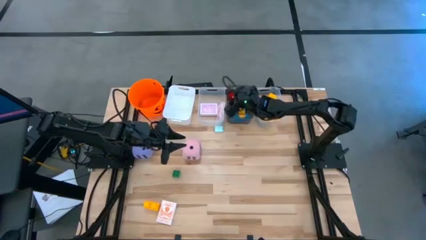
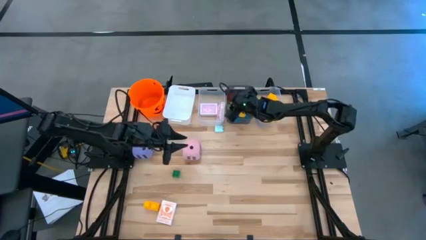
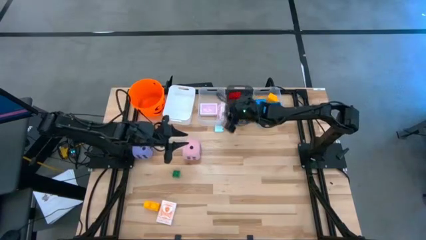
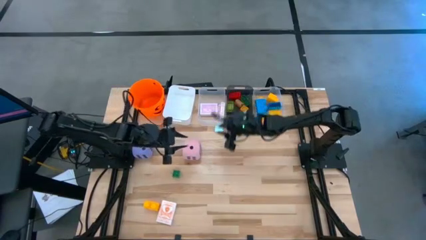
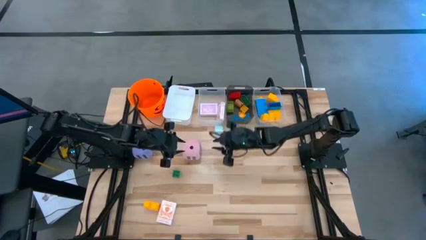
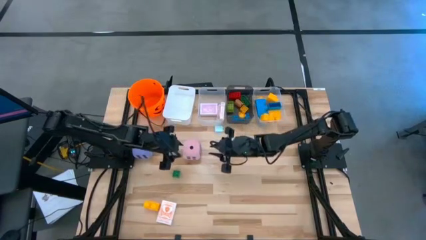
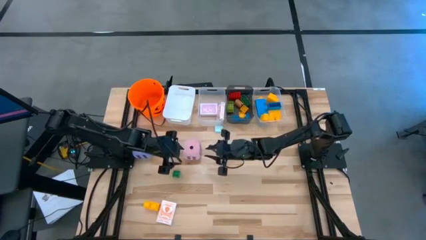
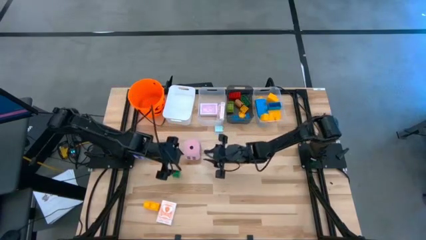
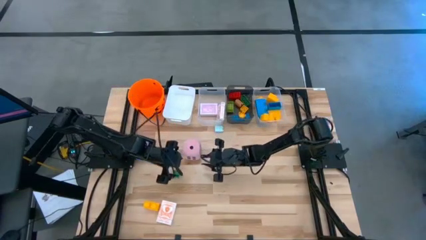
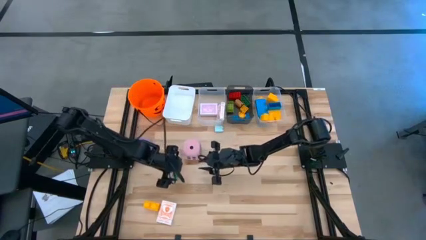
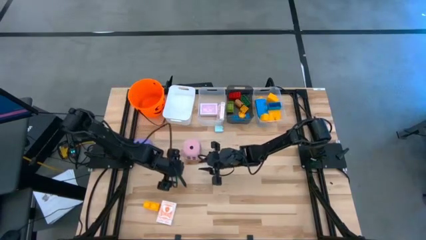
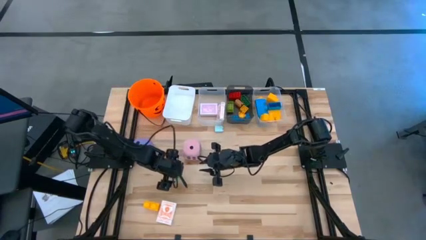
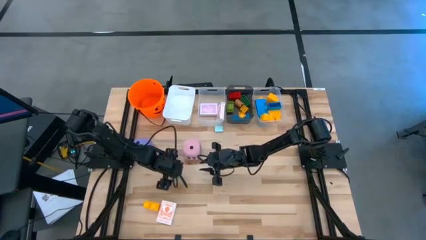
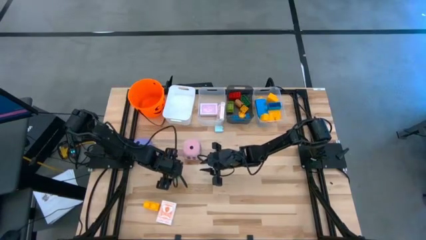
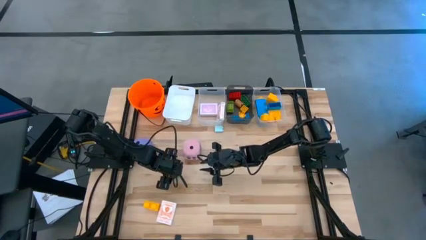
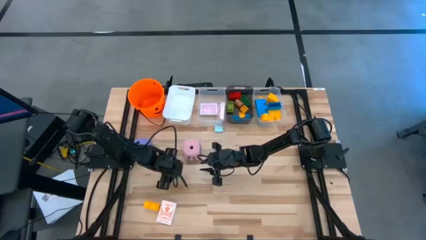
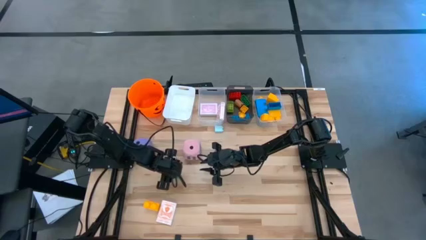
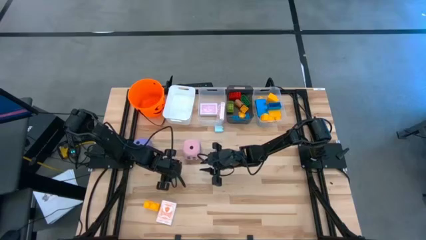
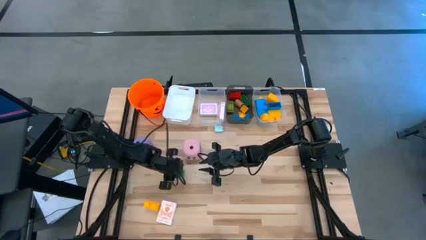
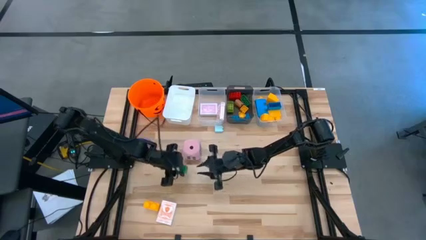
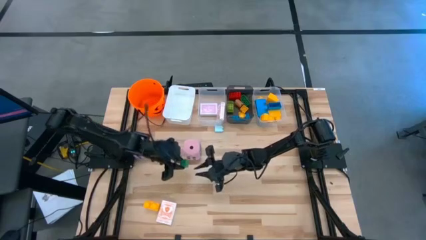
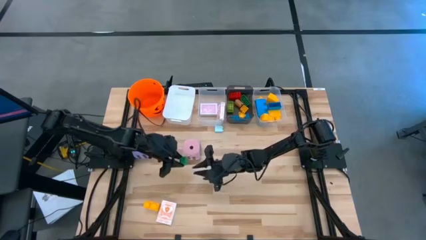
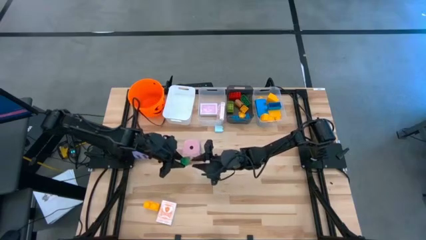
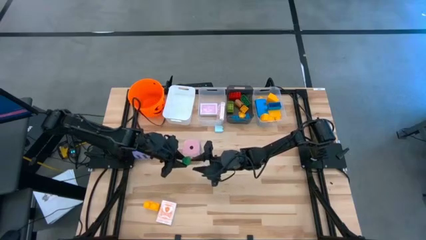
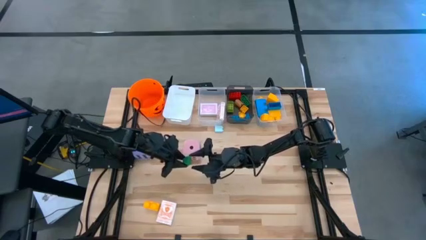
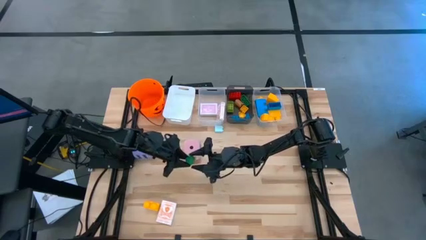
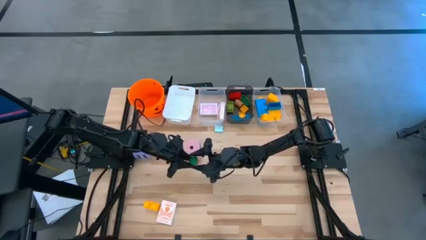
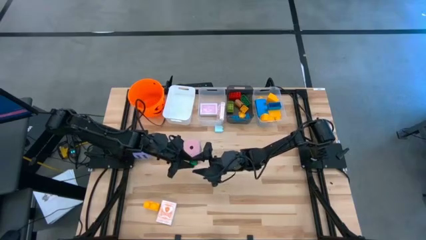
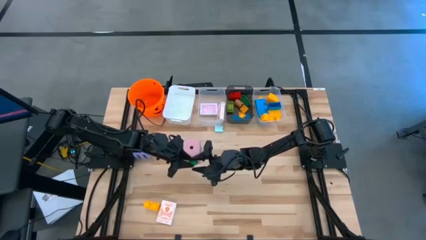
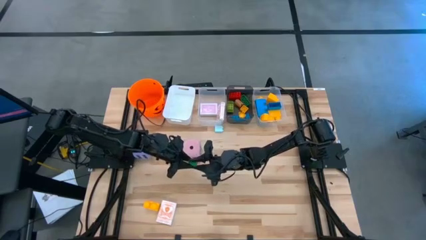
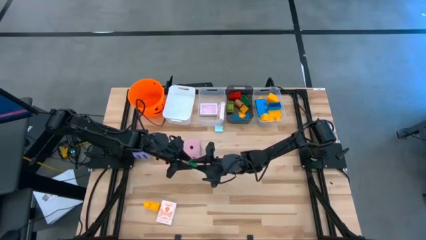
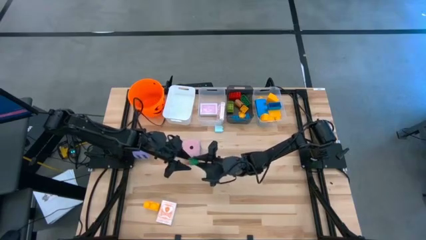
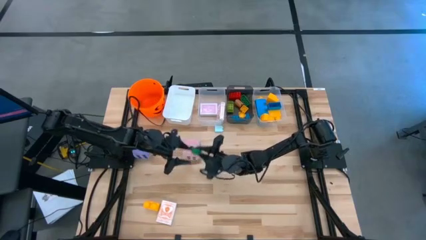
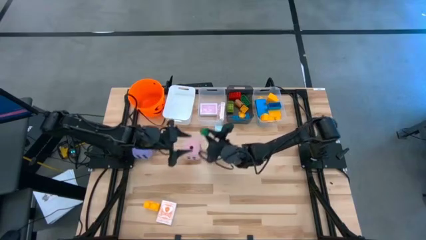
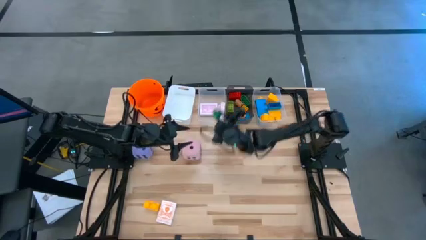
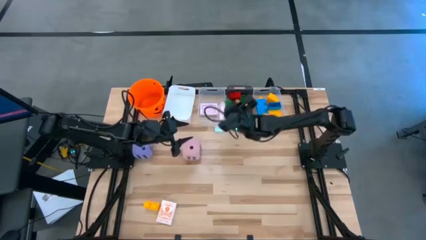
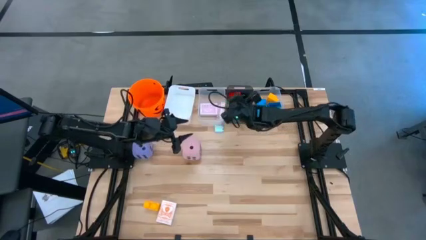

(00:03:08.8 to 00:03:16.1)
Task: Pick & Place Toys
Put the small green game piece into the black bin

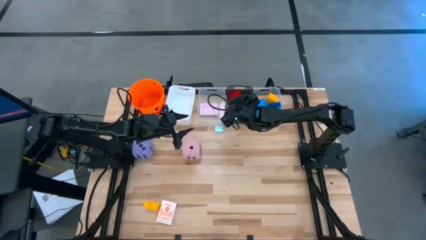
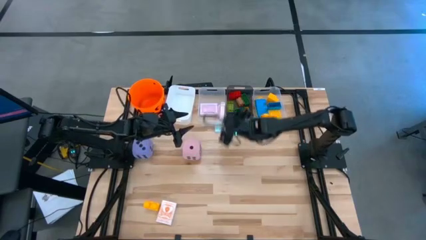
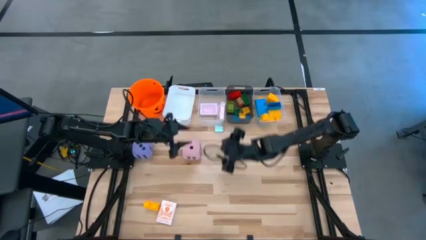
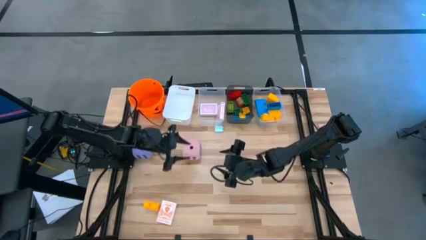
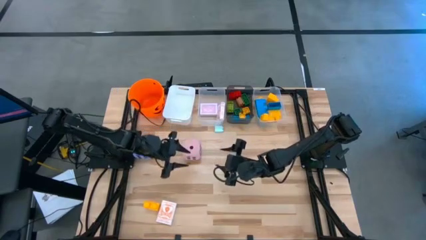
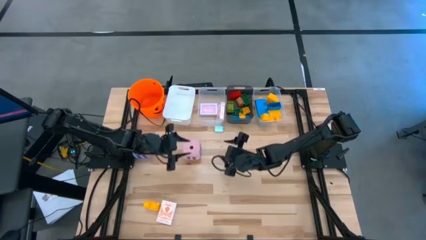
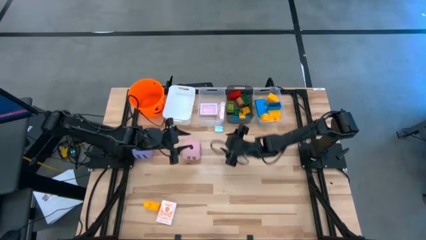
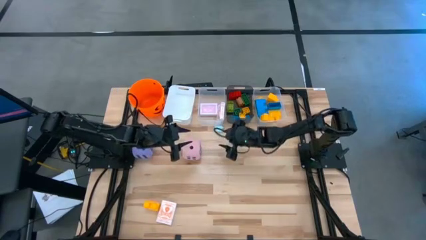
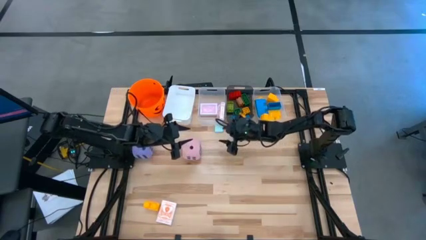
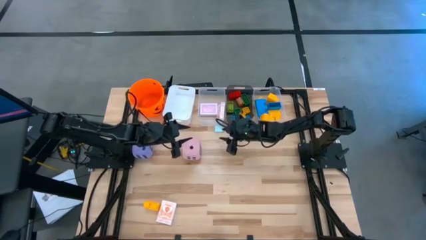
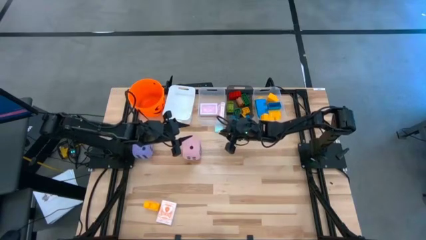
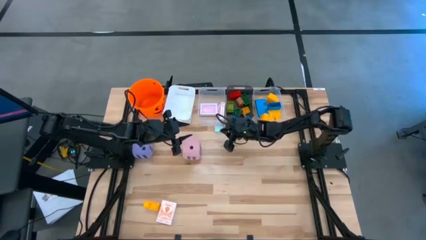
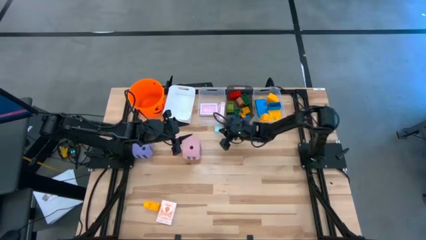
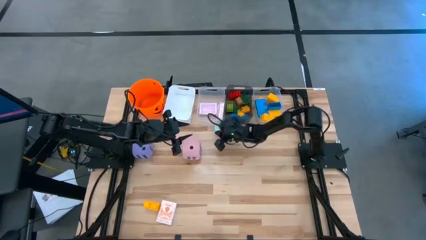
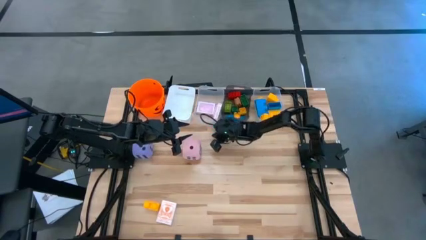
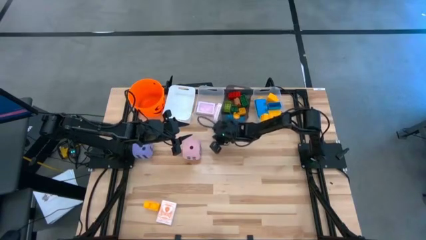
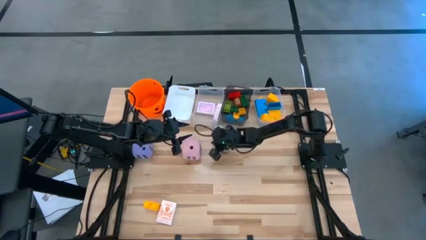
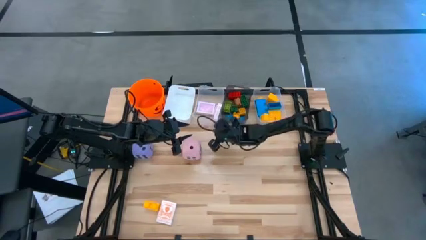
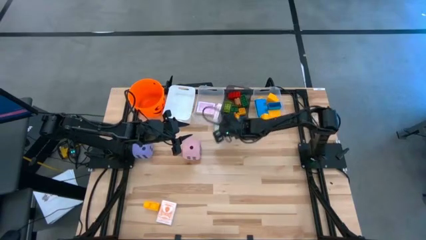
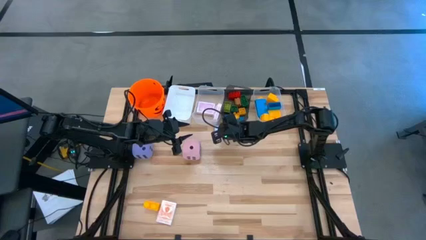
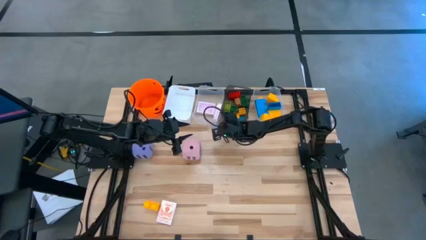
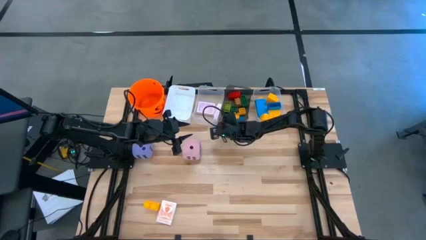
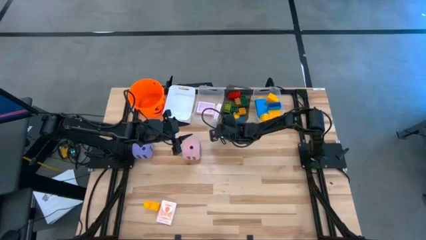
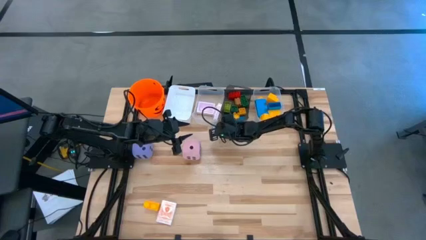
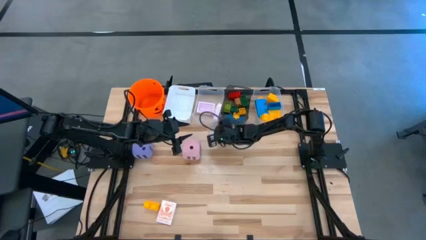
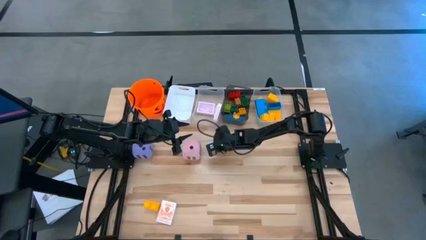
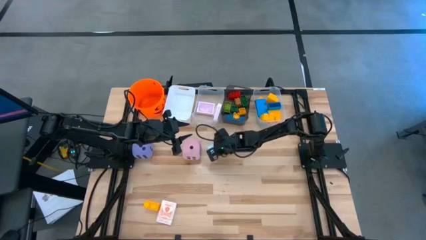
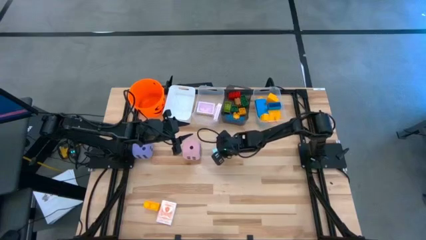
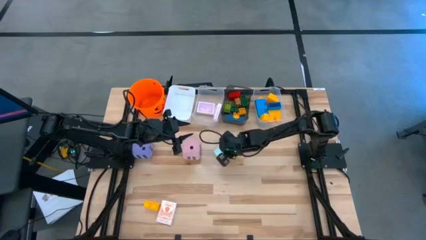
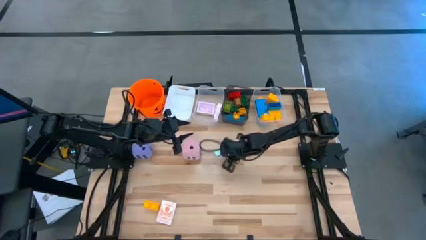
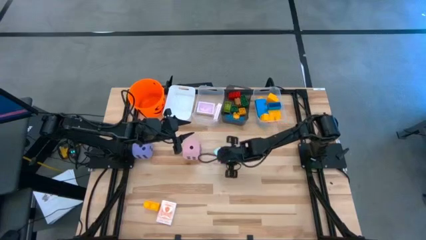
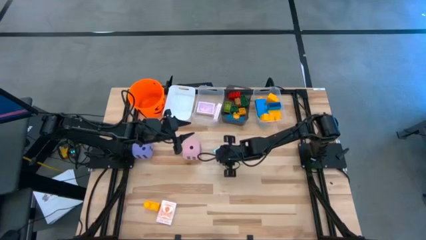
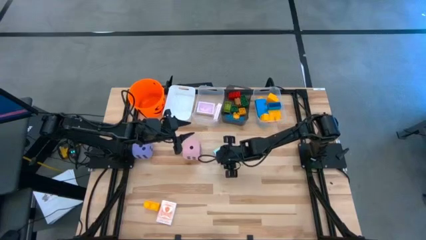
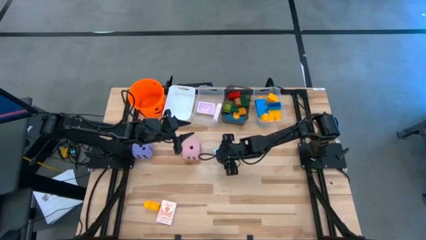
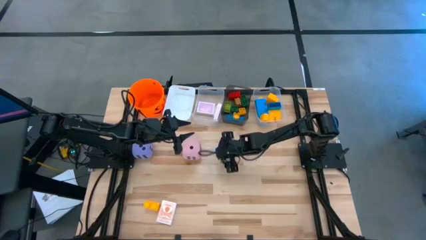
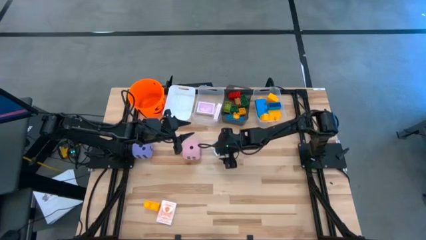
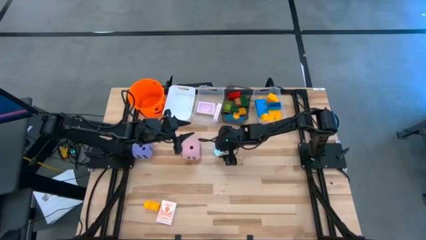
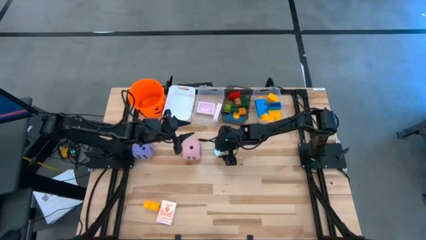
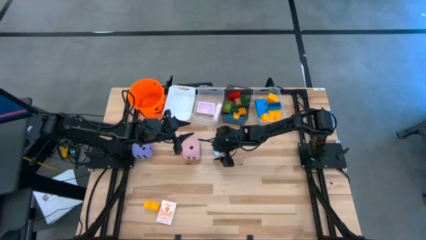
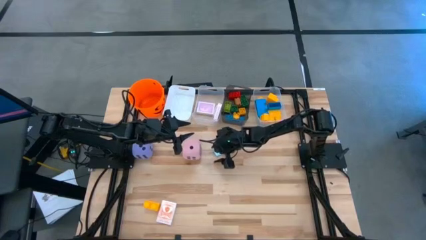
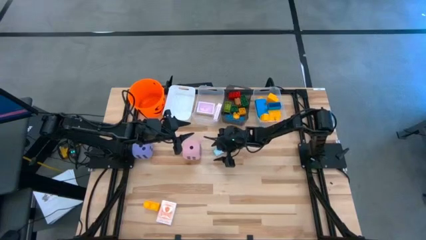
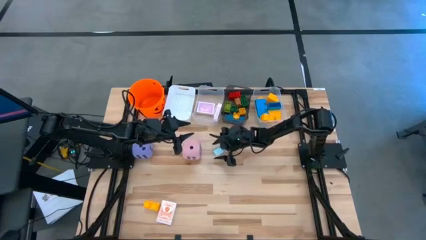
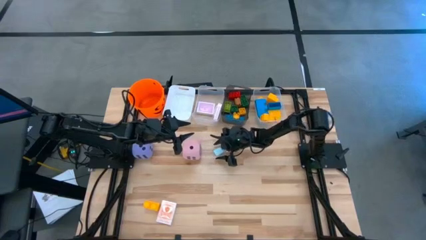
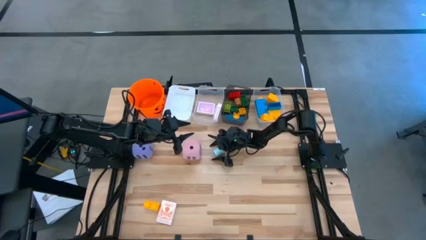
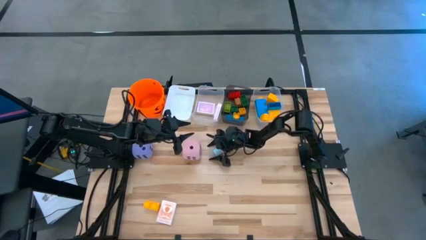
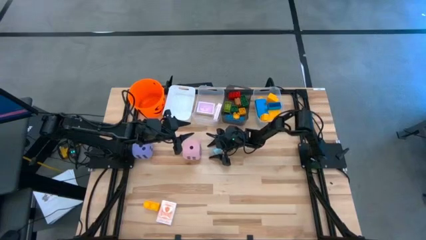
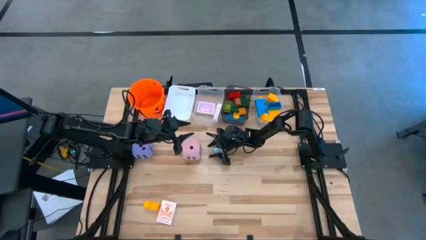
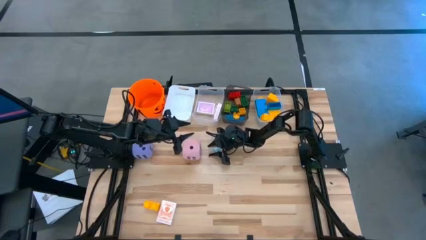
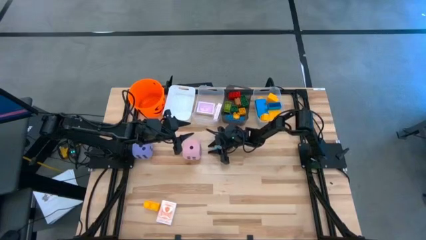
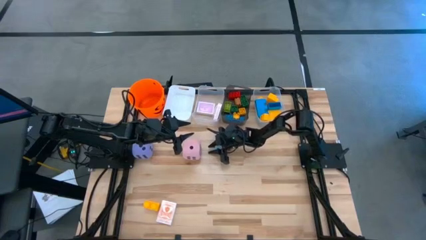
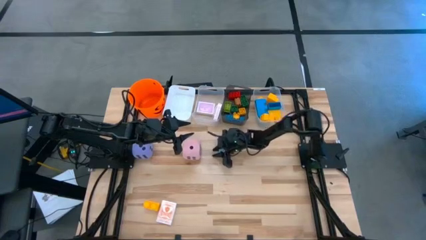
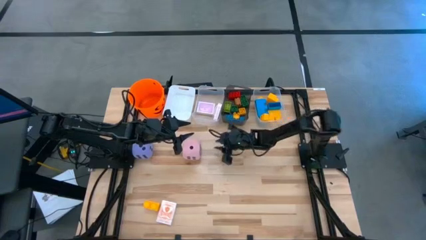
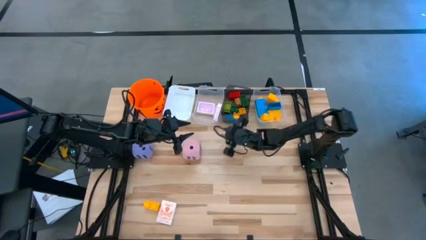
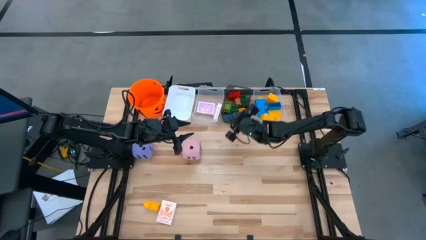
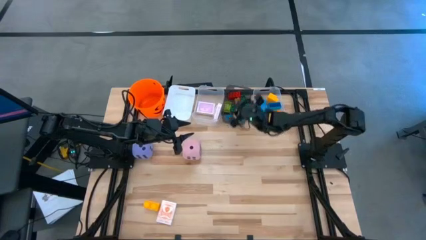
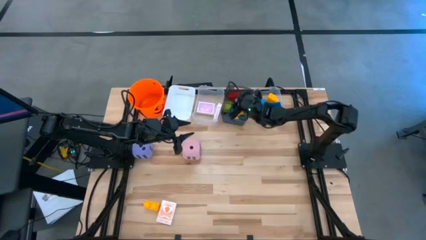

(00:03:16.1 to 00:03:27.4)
Put the small light blue game piece into the black bin
